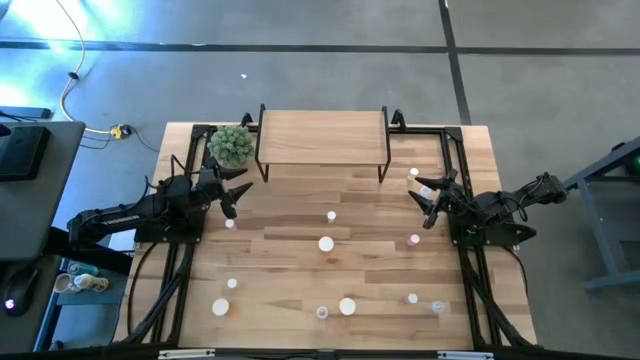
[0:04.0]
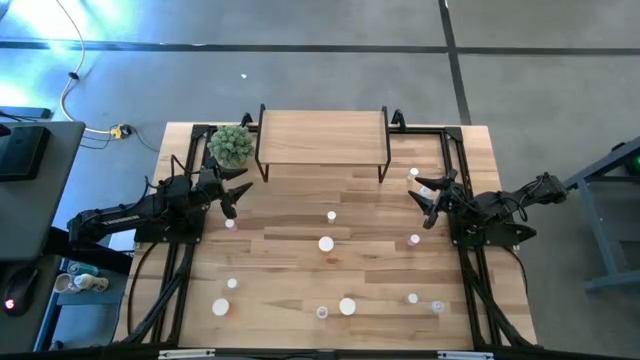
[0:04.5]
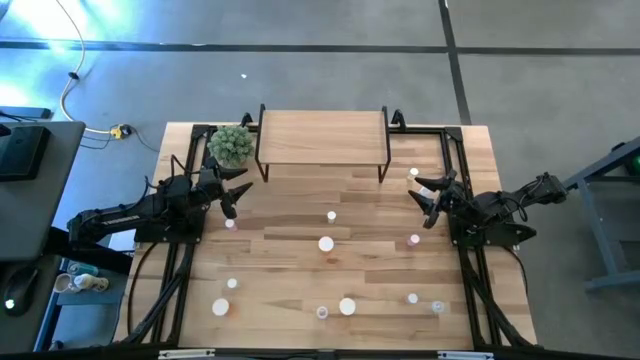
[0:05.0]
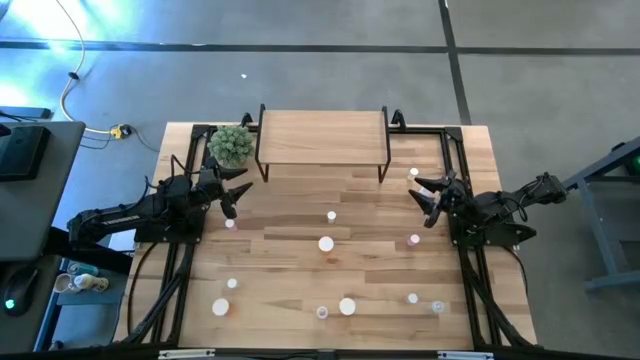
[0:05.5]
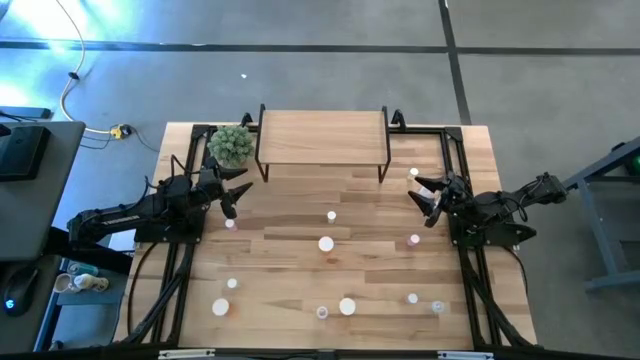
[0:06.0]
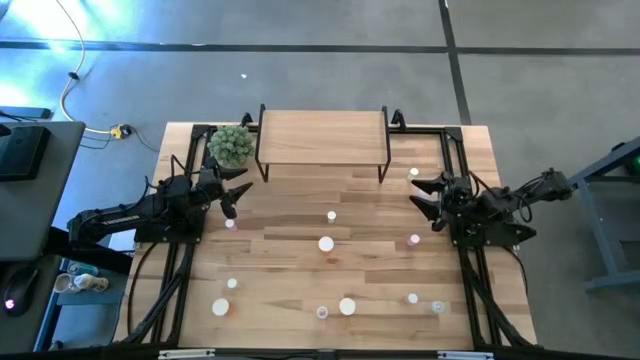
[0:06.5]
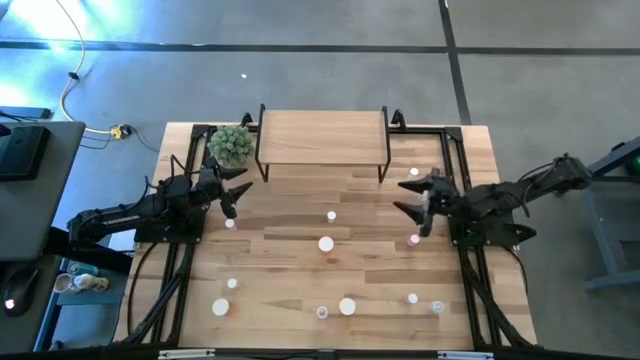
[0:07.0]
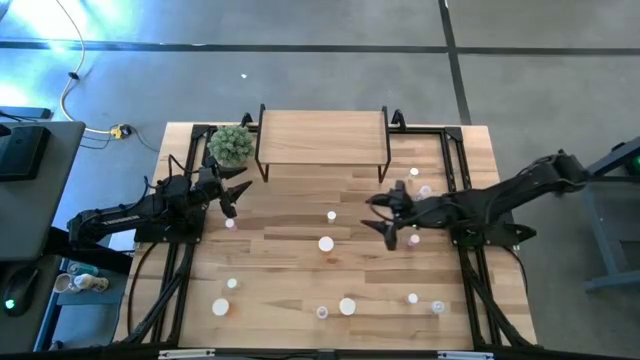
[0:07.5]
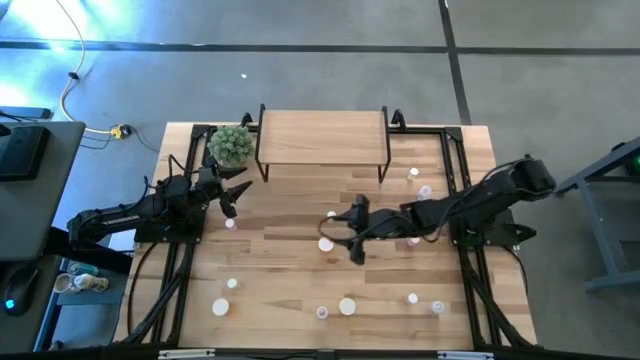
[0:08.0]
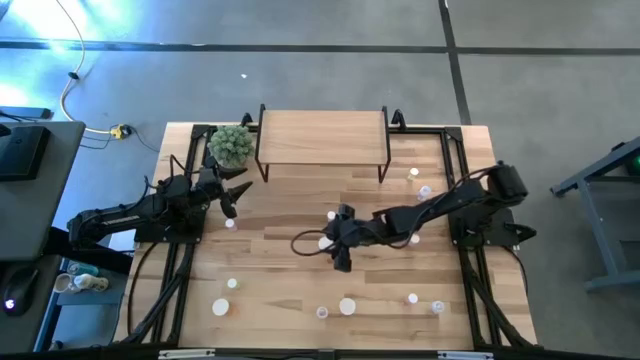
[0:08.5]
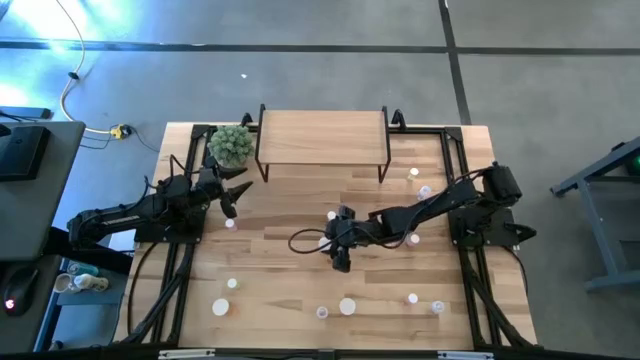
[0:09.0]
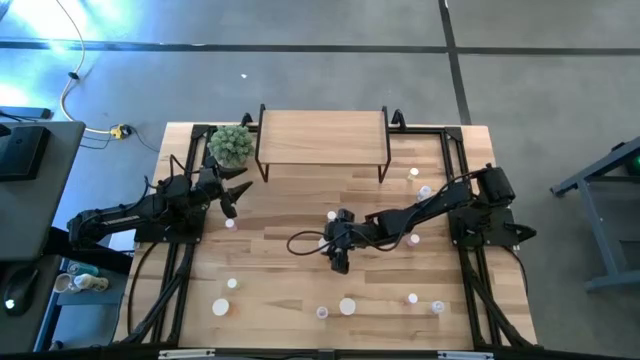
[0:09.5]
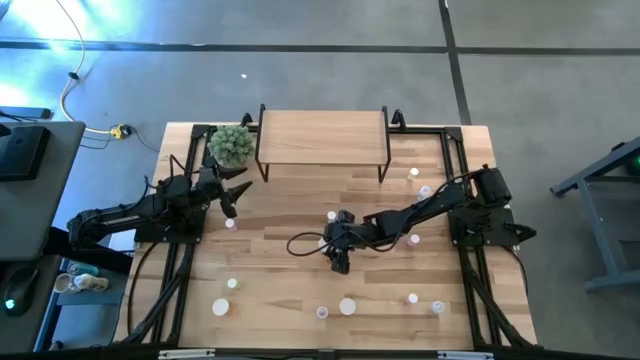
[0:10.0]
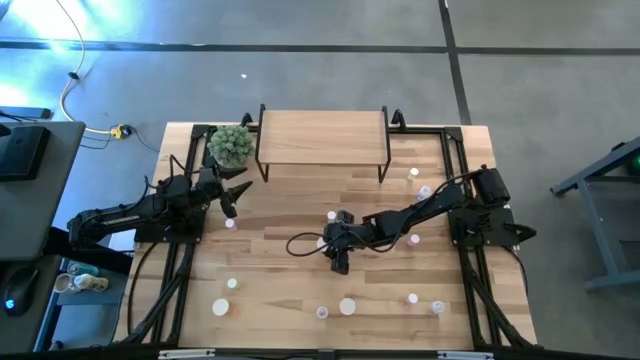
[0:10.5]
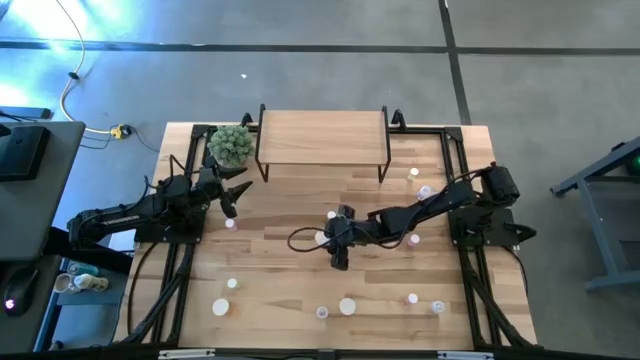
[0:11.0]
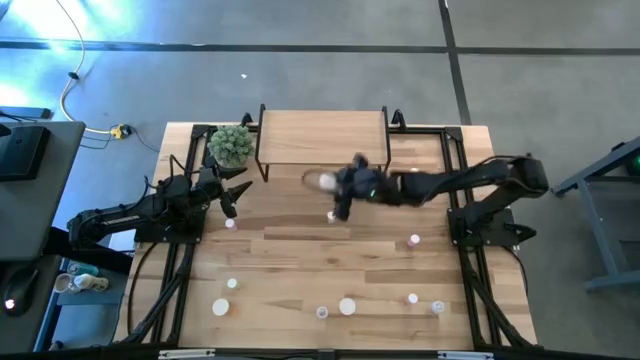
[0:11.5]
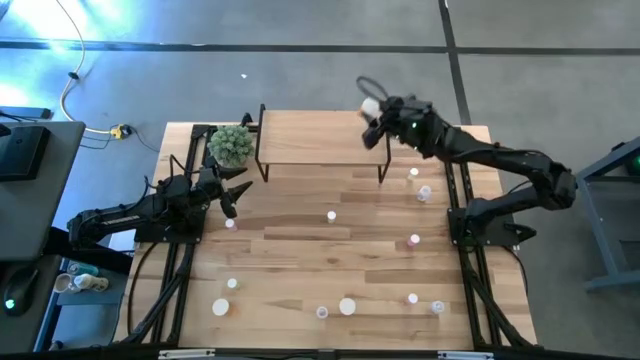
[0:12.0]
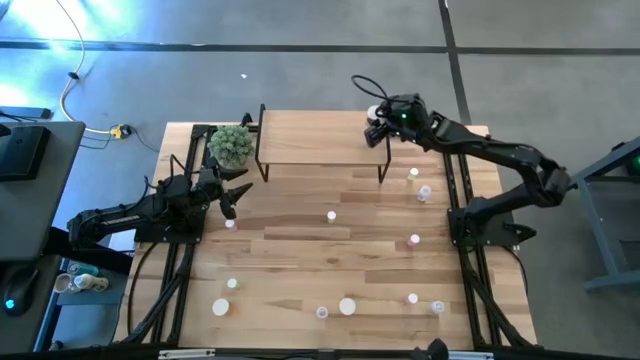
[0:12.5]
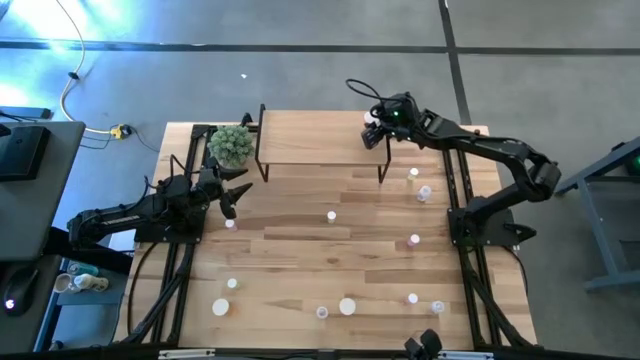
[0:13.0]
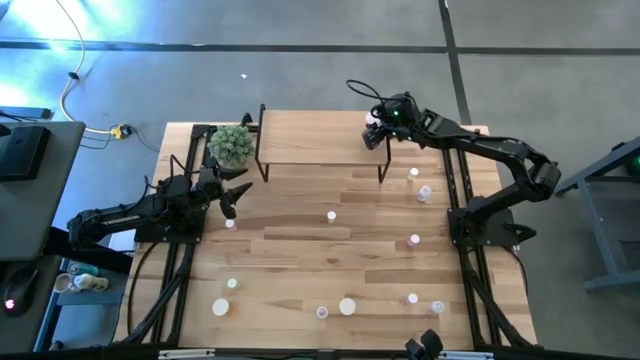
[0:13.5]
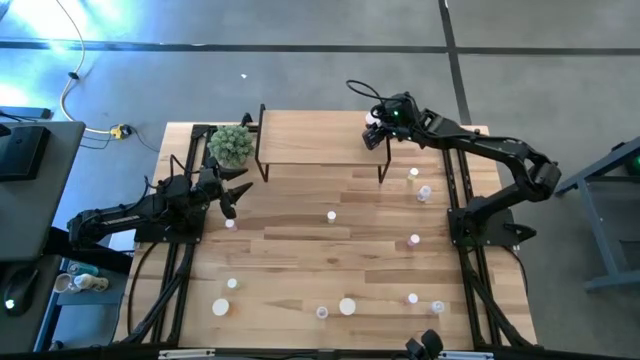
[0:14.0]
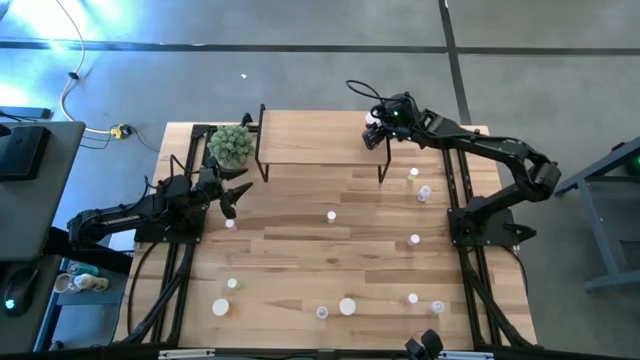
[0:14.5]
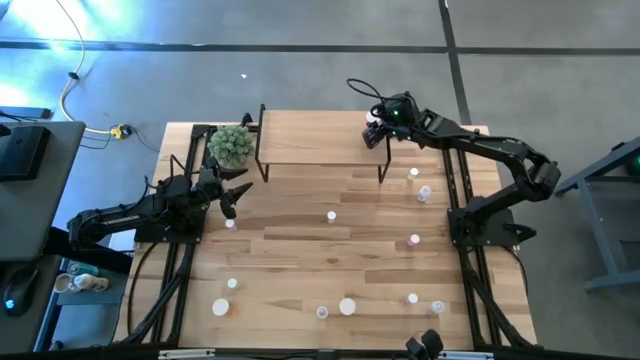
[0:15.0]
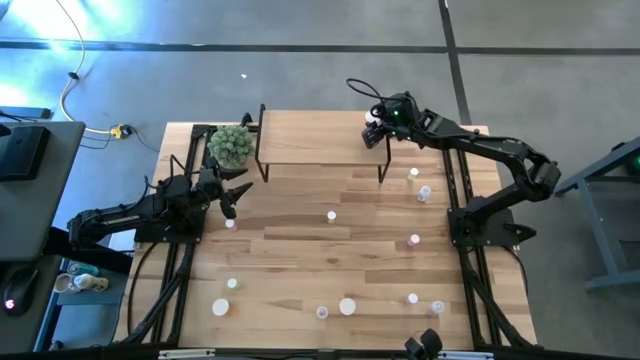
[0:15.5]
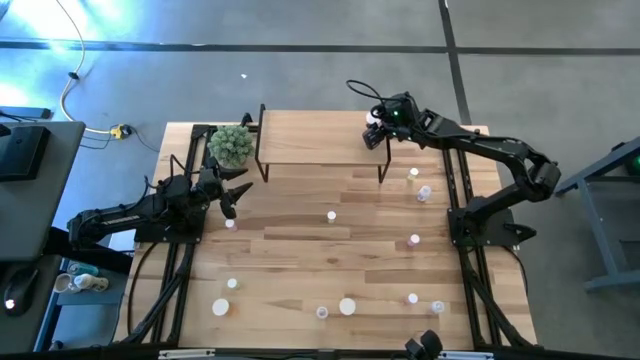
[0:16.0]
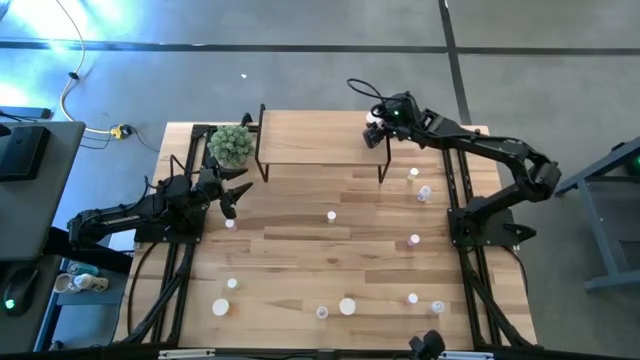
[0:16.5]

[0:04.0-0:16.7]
Task: Pick and place medicine bottles onto shelf by color
Put the top orange pill bottle on the shelf

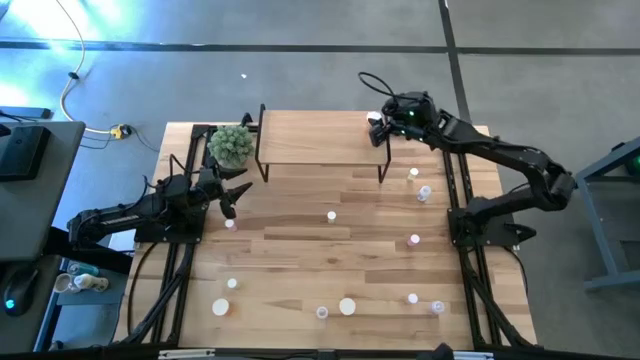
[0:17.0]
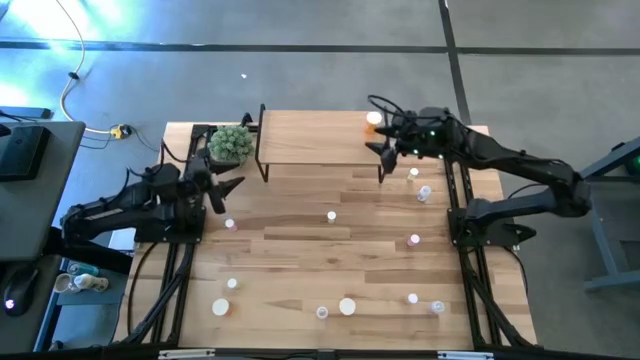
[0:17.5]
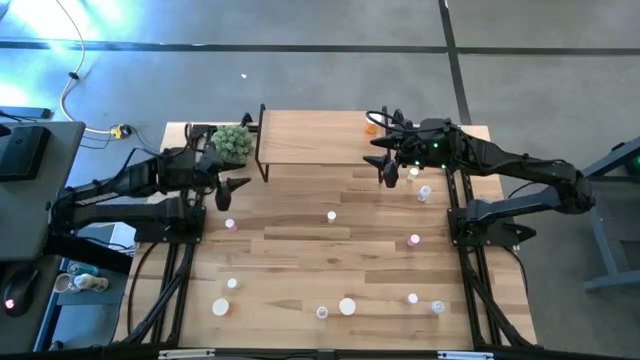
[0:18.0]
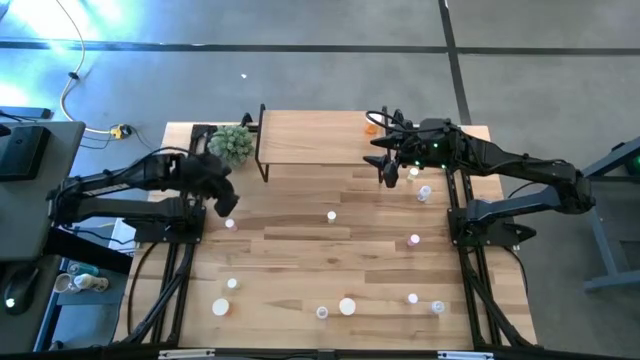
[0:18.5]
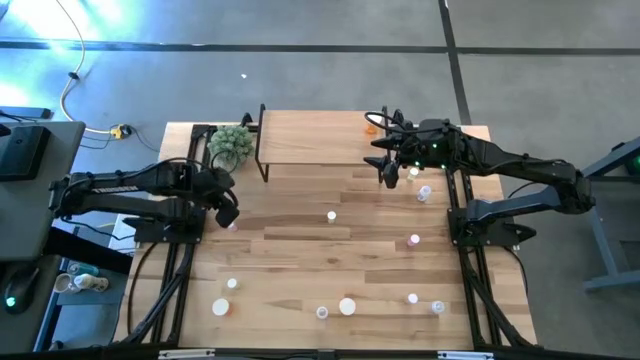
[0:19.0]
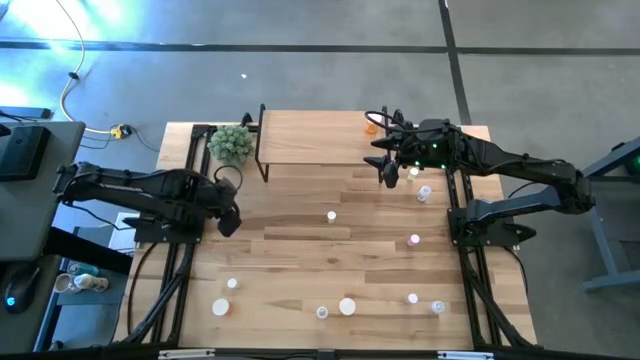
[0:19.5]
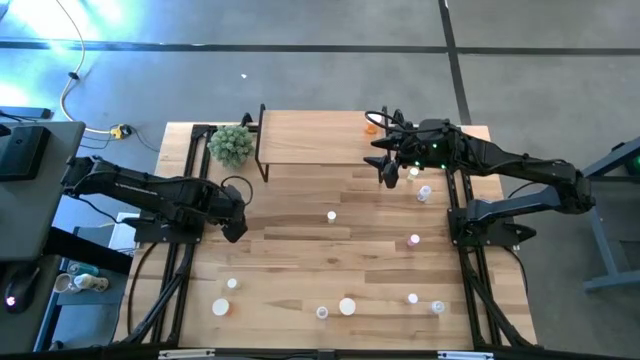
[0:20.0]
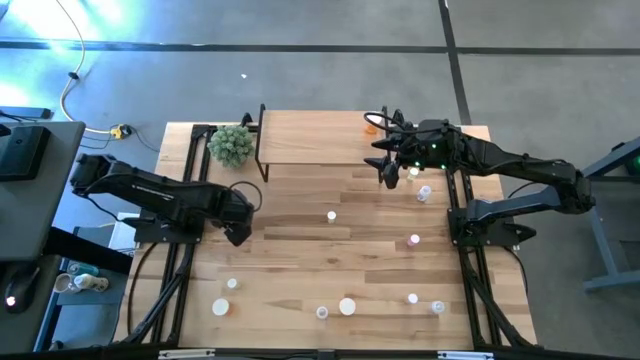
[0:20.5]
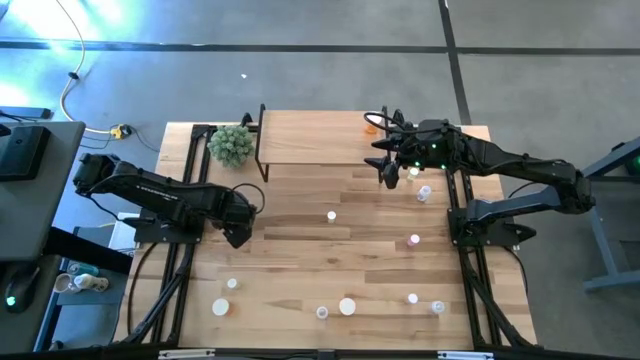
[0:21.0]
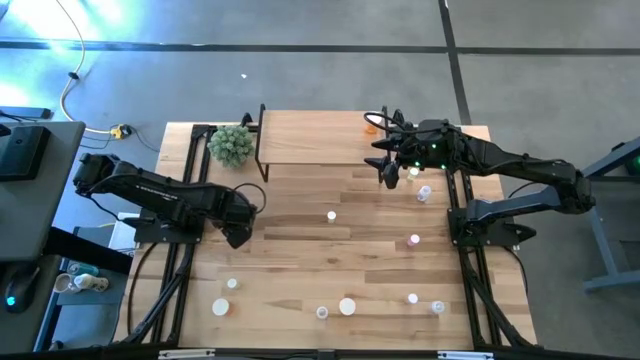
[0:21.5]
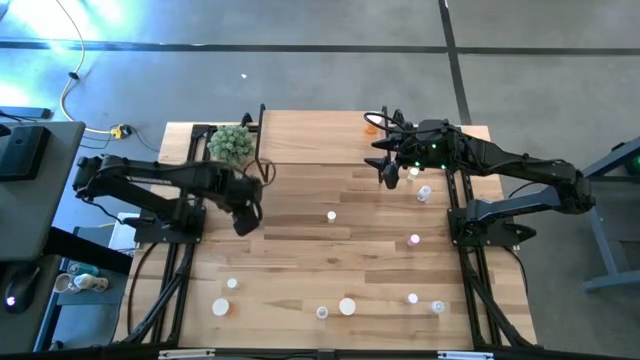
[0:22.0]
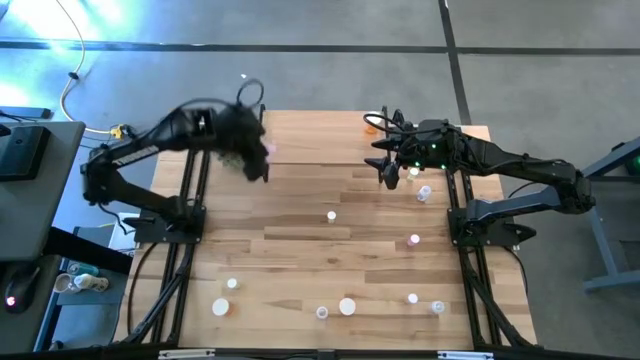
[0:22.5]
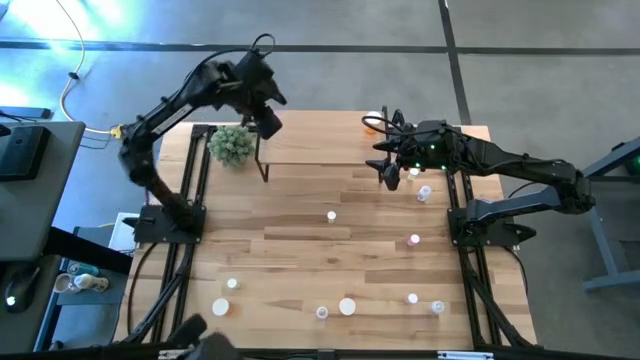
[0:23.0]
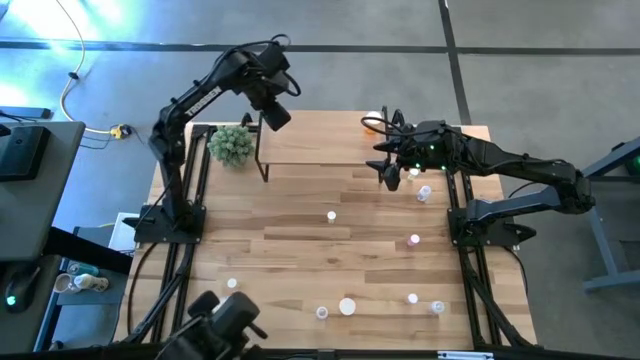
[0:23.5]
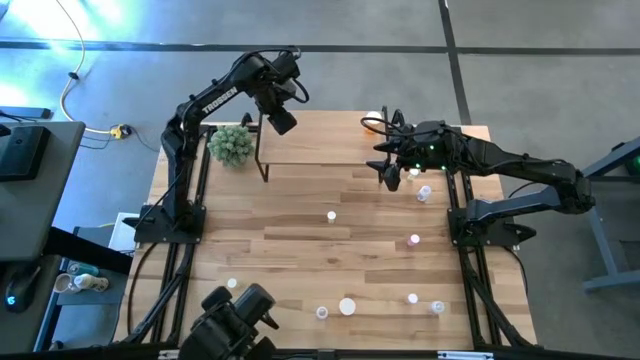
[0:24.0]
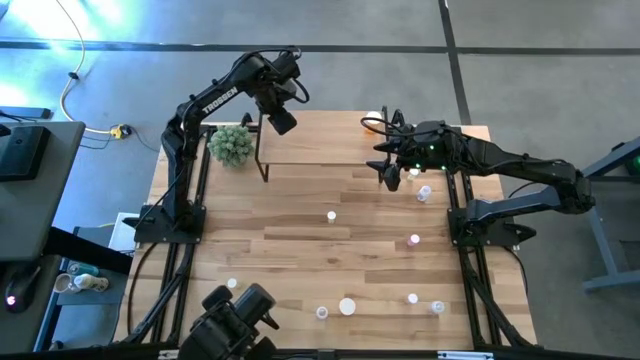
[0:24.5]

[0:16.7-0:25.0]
Put the top left pink pill bottle on the shelf
